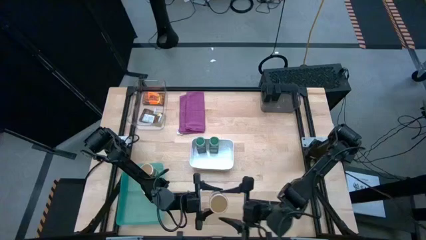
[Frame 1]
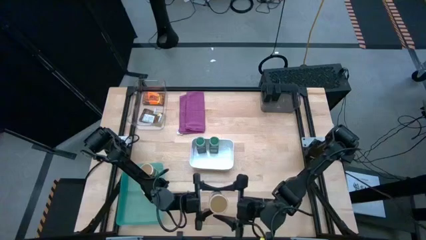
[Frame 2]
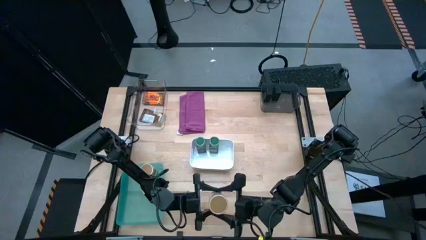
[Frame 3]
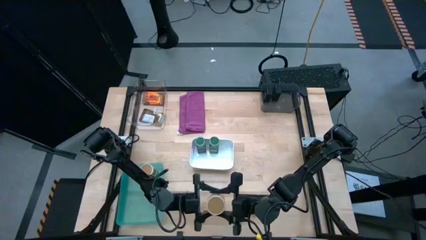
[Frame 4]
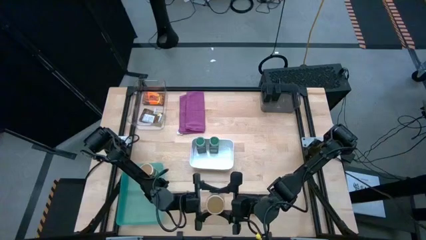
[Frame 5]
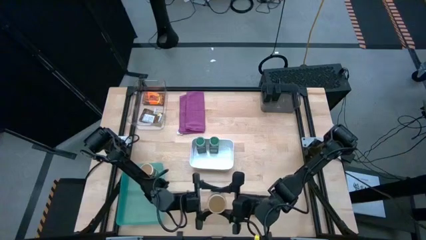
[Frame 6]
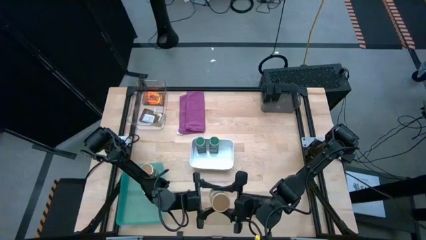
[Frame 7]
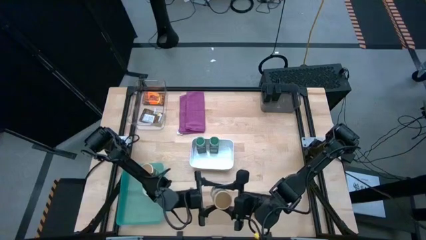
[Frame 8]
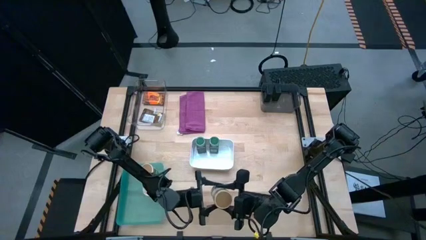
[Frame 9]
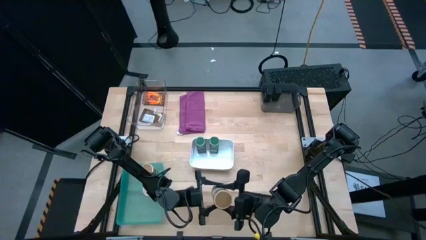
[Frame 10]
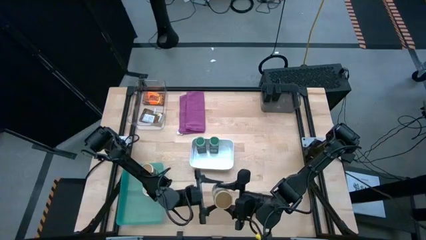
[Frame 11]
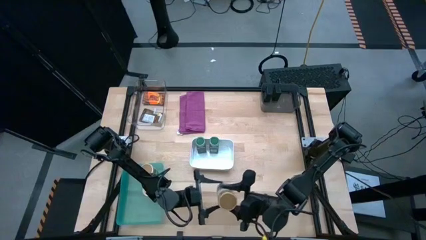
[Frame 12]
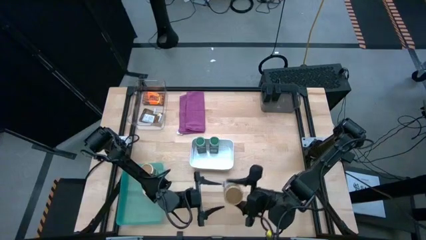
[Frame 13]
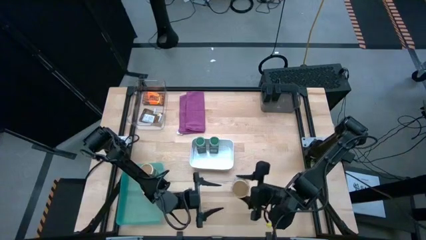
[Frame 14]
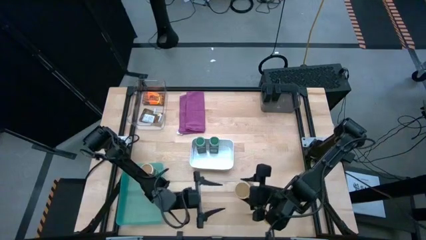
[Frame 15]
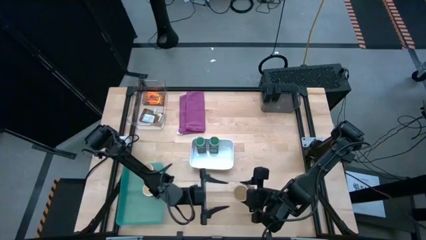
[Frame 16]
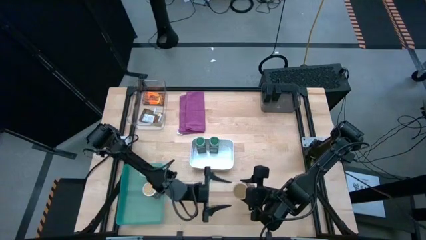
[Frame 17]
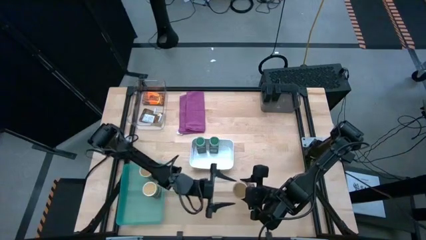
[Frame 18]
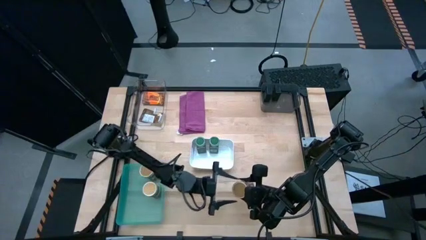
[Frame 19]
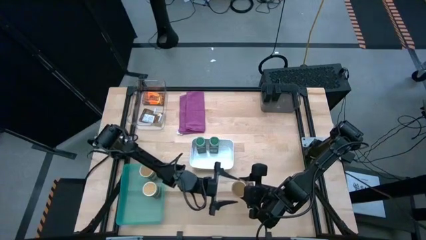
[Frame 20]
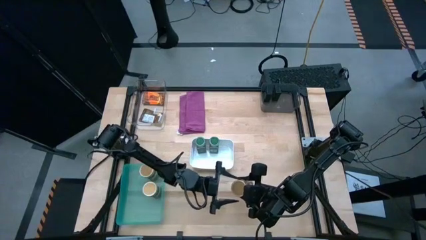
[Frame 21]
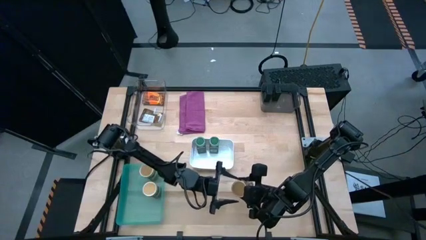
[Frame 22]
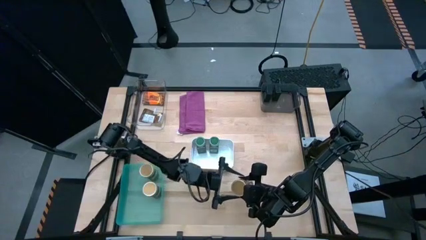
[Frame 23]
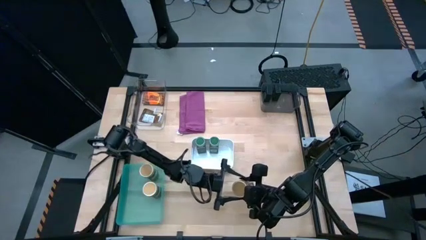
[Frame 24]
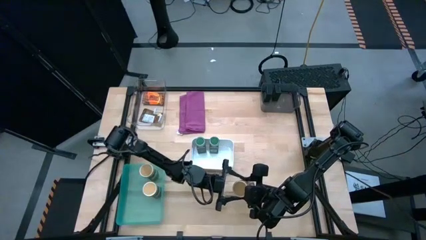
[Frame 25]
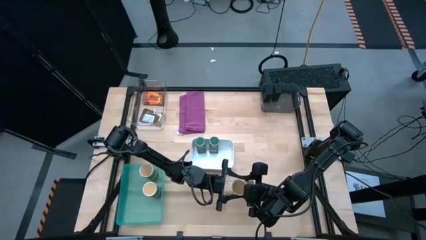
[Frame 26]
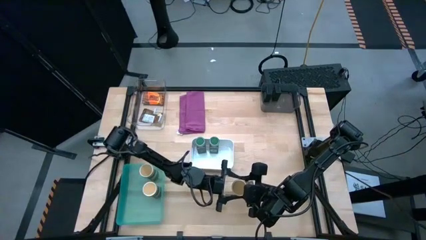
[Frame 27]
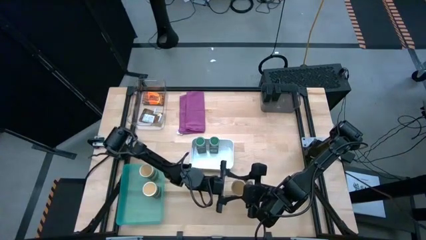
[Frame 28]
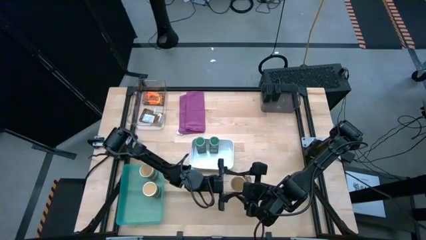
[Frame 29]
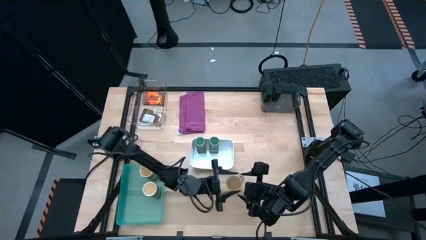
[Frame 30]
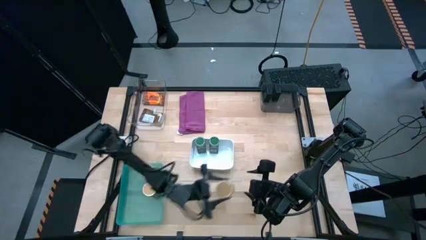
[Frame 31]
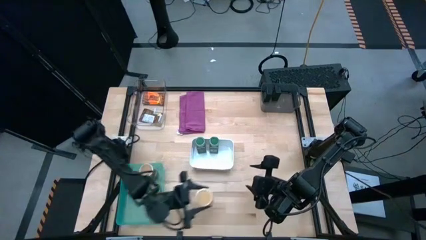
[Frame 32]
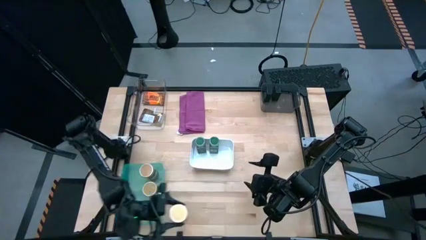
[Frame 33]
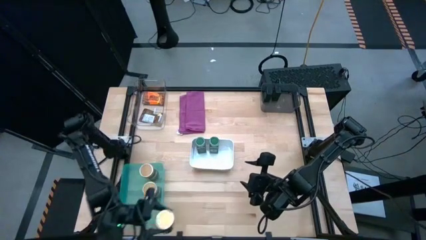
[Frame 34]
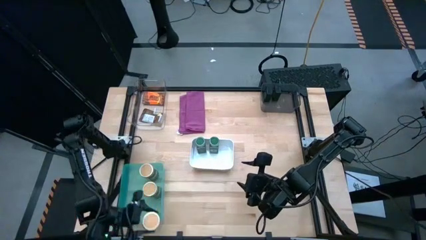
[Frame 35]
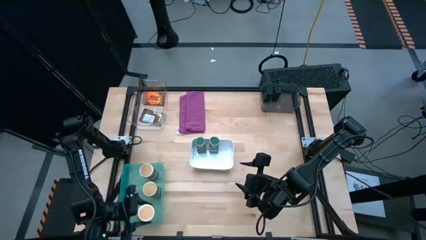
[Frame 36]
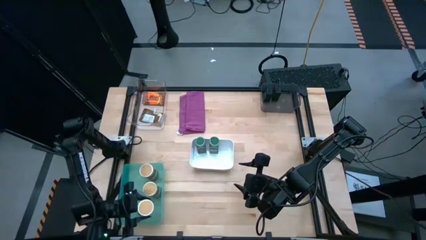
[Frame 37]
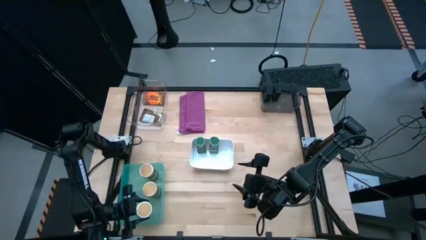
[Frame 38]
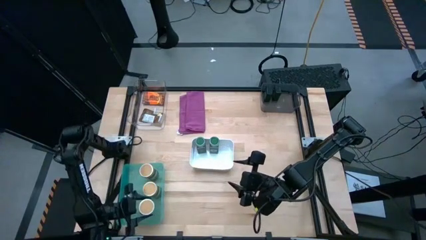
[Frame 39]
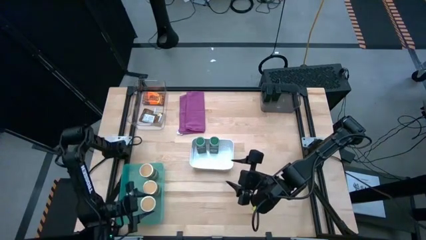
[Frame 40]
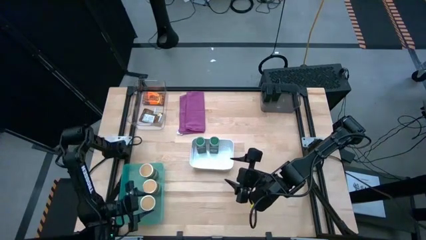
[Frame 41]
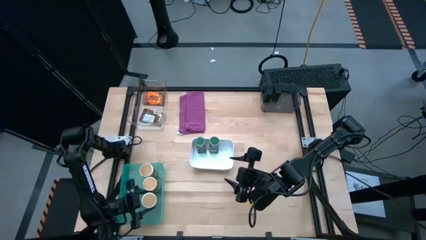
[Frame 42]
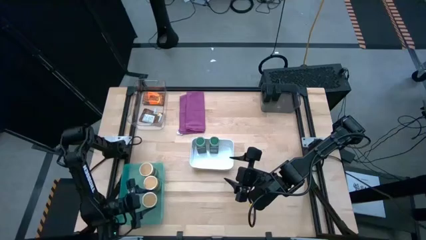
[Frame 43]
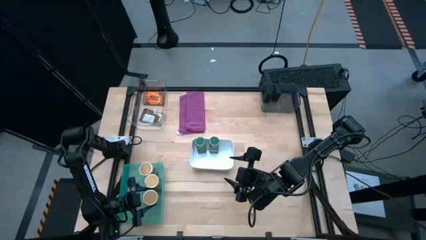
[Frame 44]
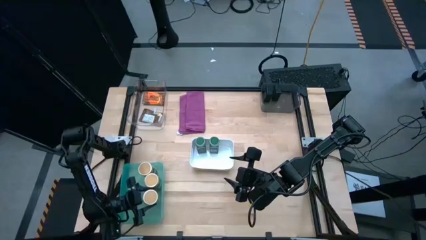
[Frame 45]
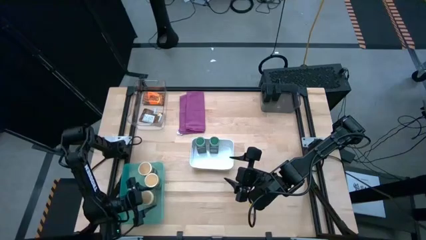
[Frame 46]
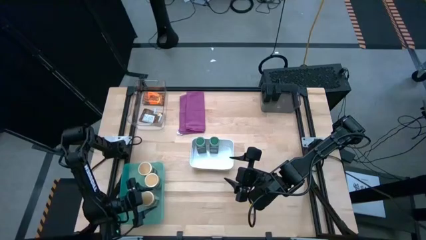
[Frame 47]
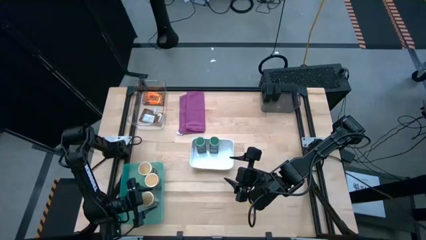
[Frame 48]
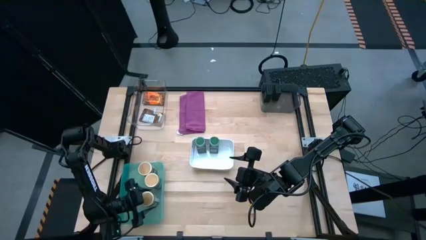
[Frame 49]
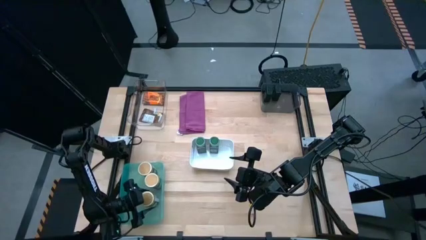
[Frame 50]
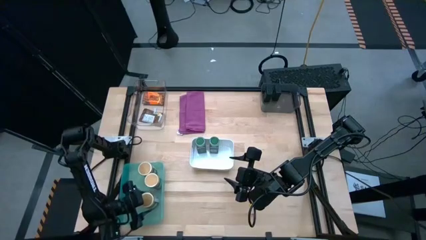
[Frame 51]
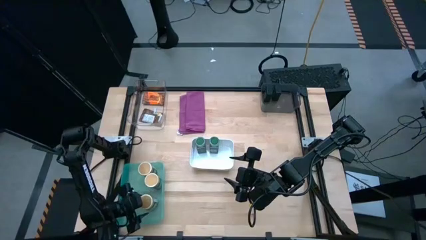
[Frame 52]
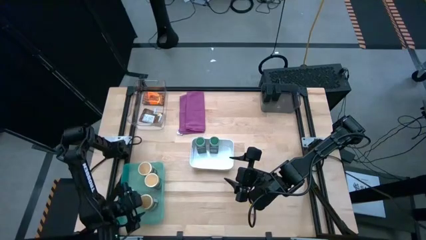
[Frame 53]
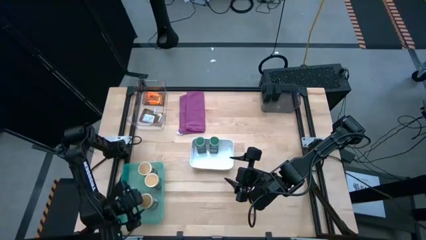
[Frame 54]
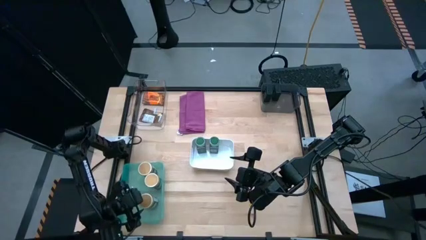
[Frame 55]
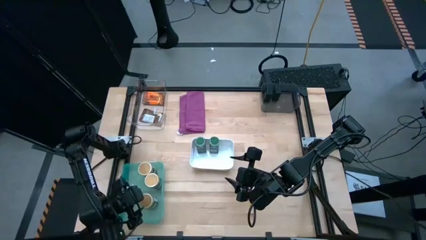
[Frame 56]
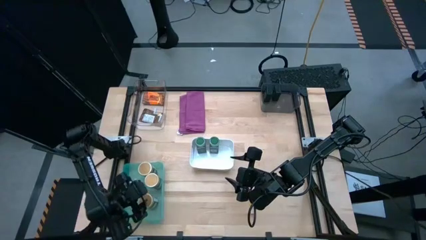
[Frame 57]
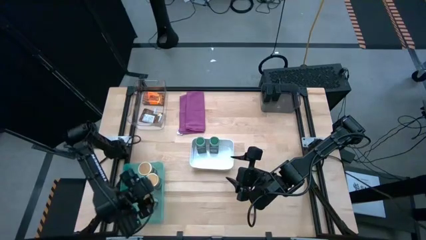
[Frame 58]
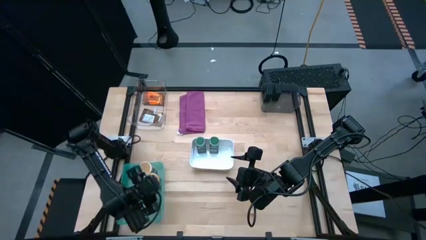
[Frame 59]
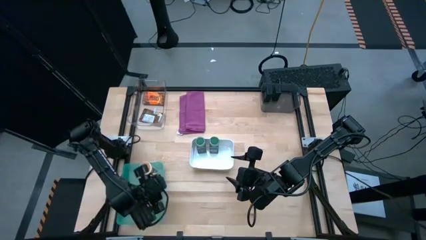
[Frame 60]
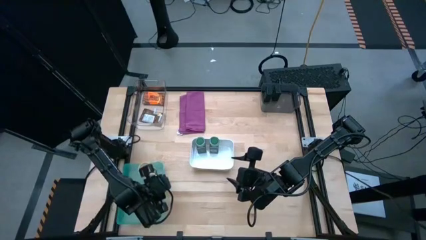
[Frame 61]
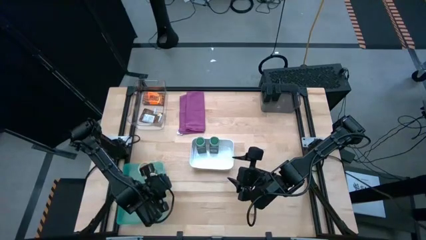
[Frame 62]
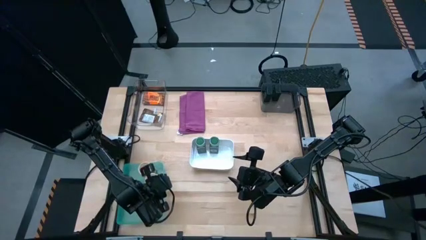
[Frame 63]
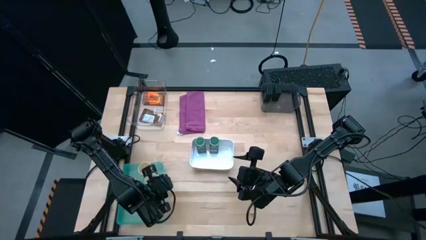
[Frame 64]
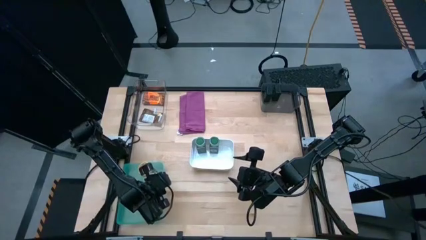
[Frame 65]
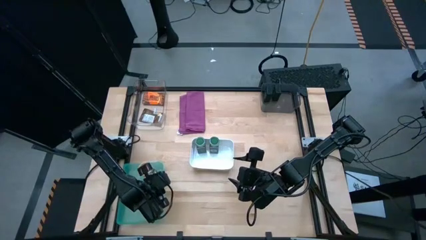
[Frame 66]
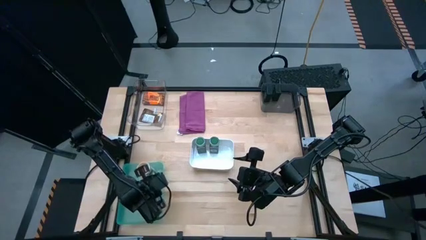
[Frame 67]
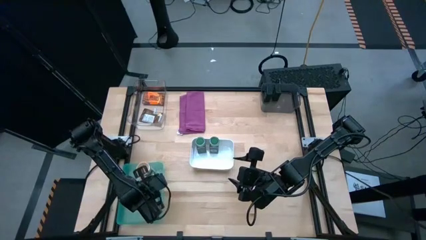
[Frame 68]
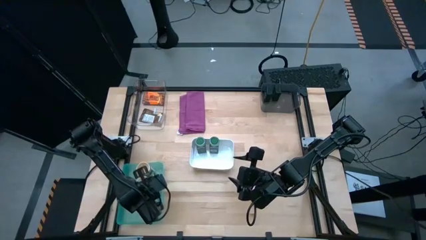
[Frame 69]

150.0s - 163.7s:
Task: Sort spices by type
Put the brown seasoning bottle into the blue bin
